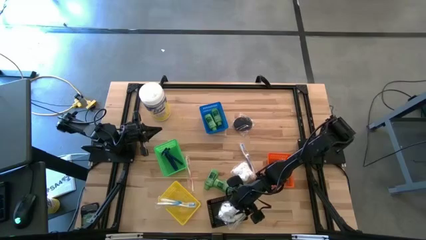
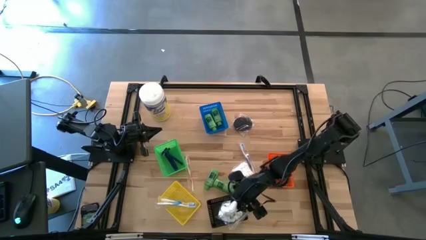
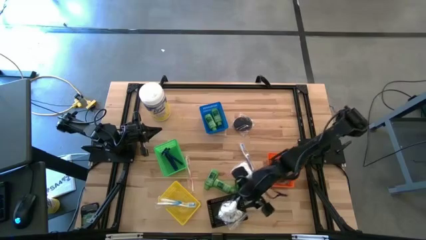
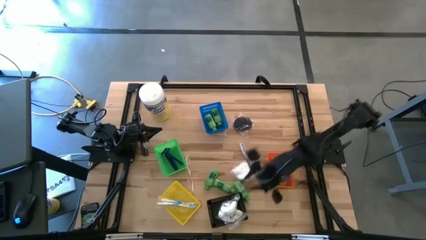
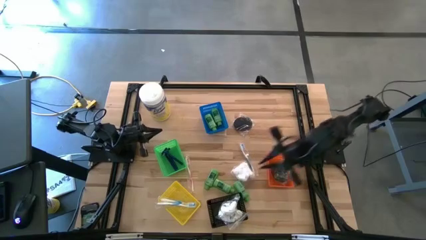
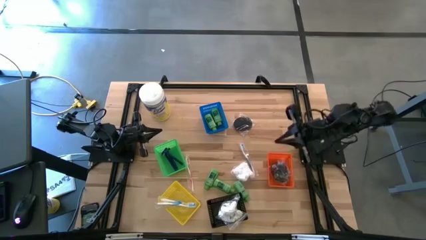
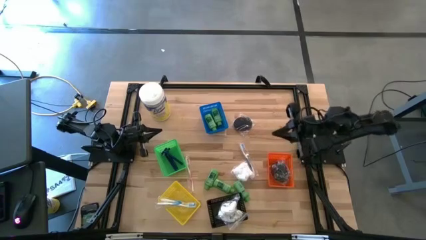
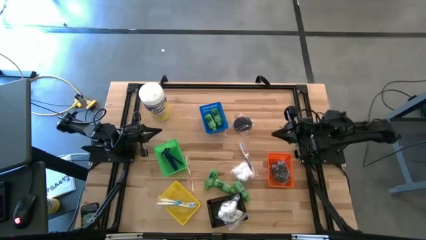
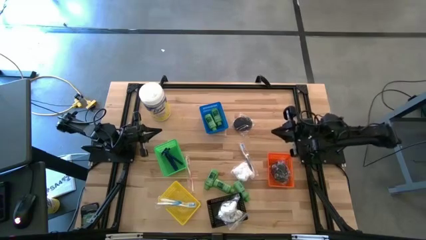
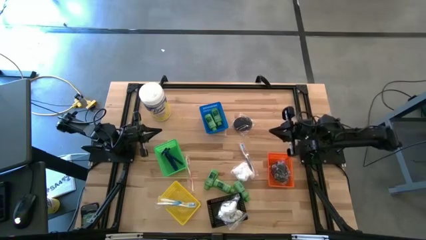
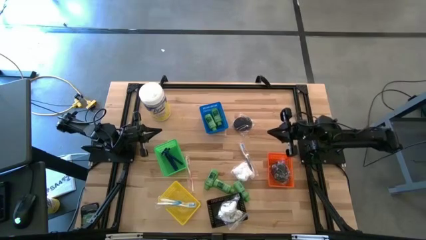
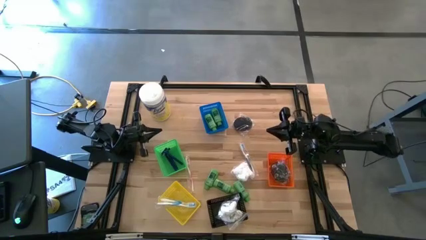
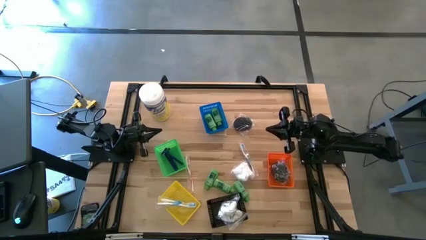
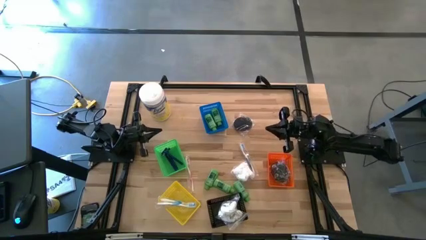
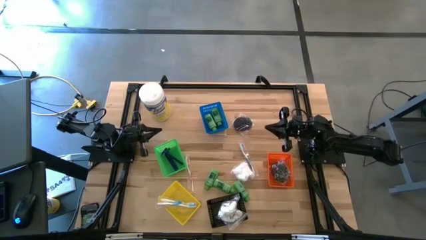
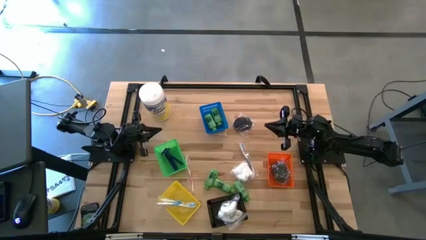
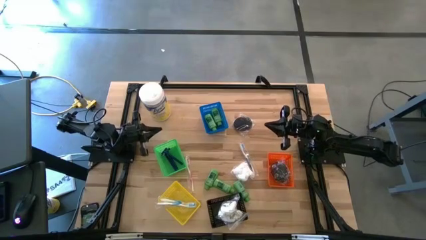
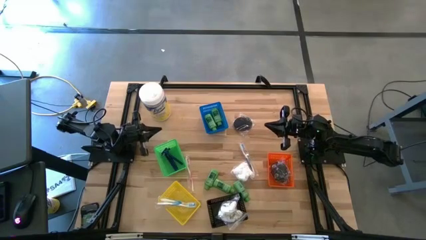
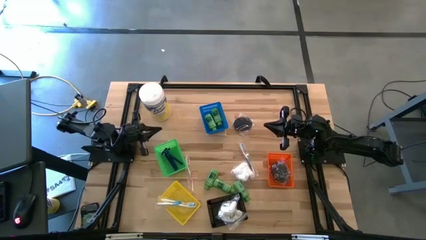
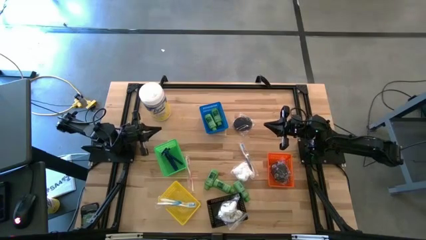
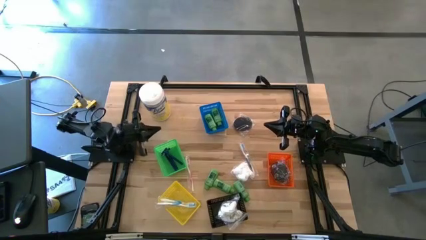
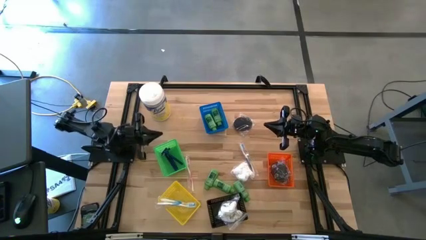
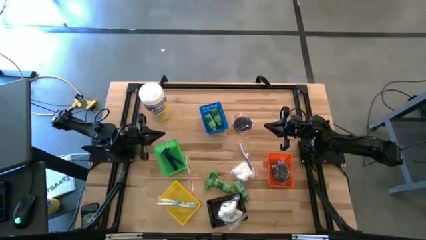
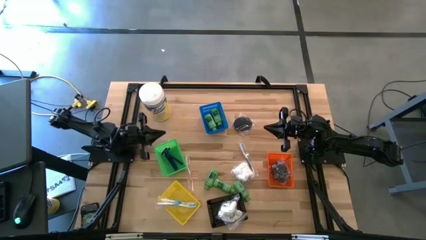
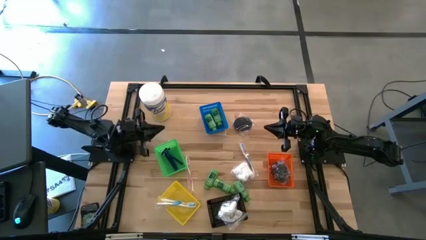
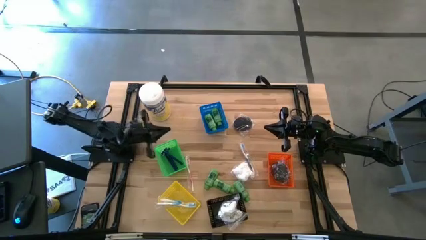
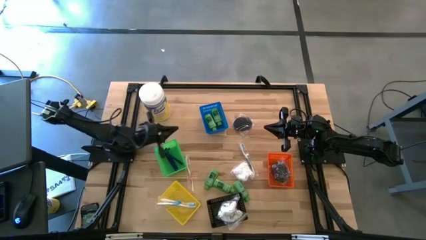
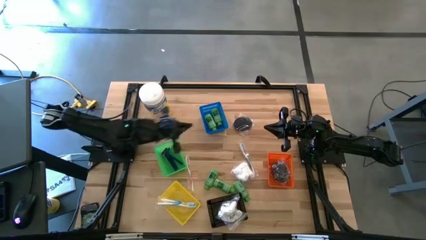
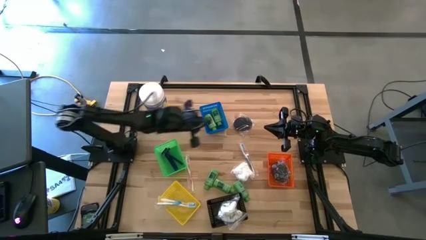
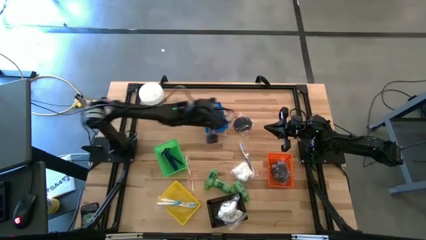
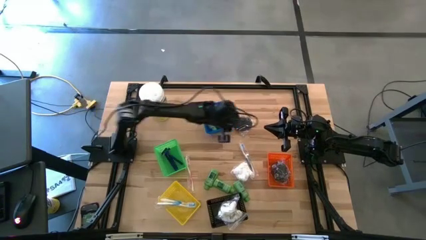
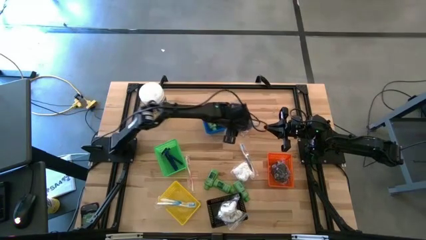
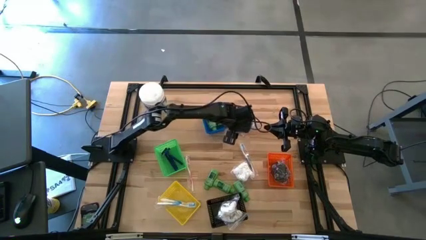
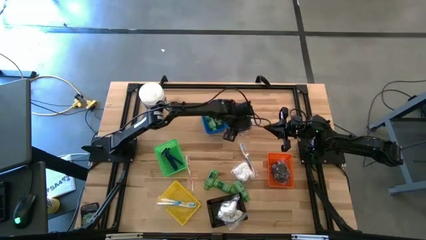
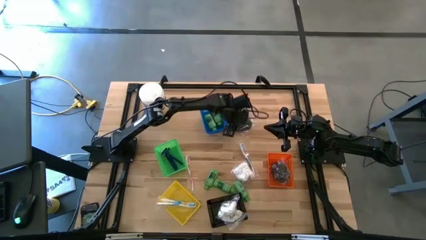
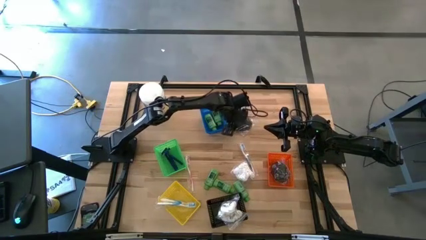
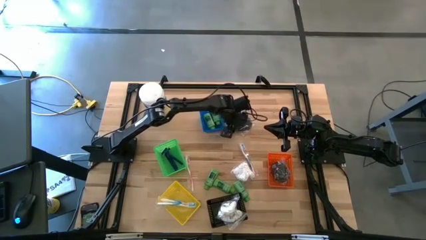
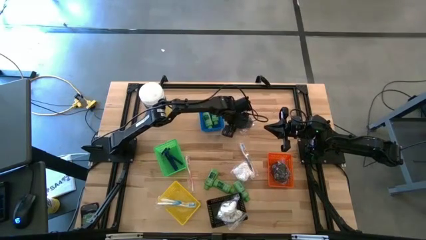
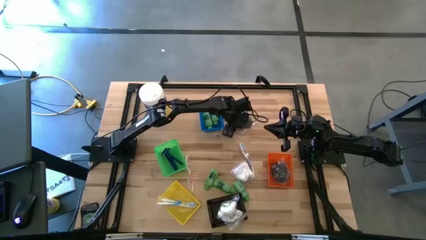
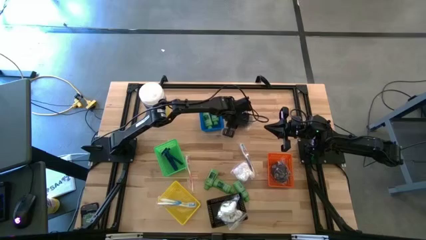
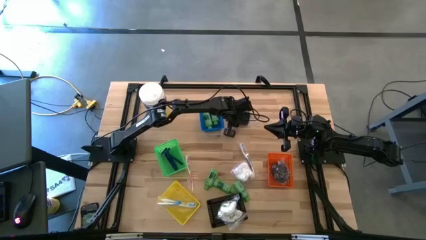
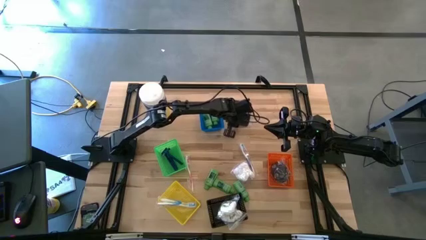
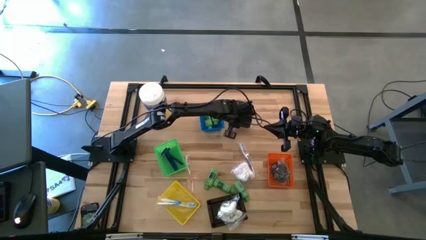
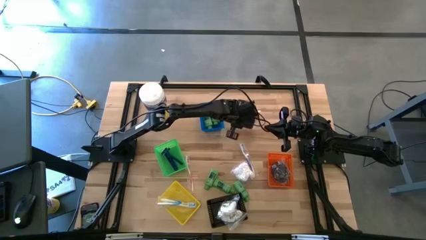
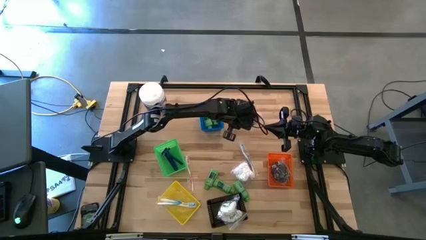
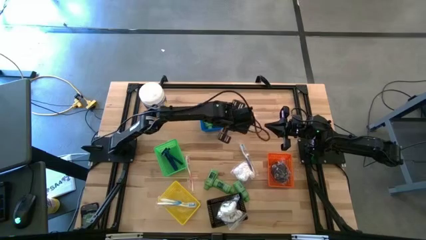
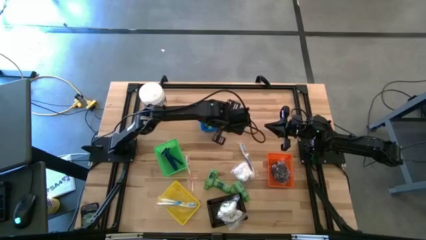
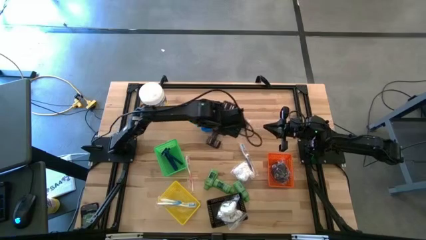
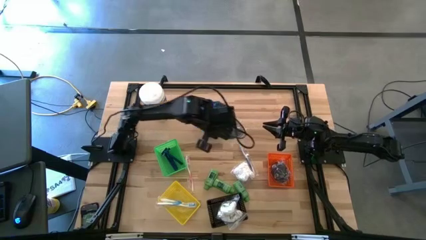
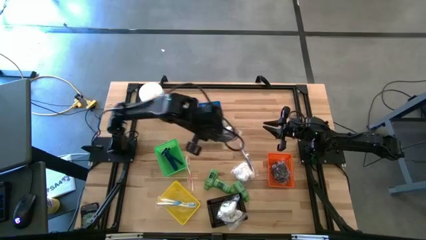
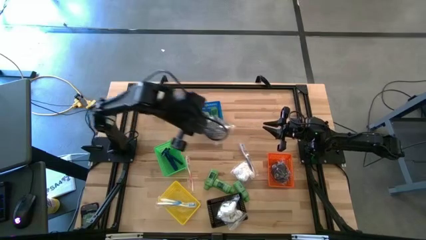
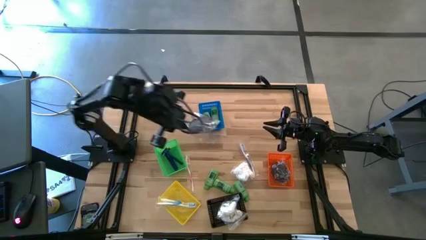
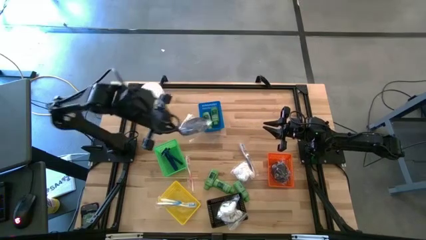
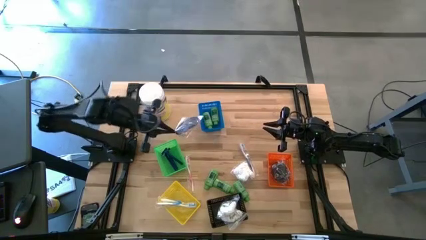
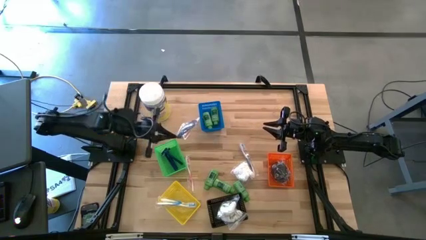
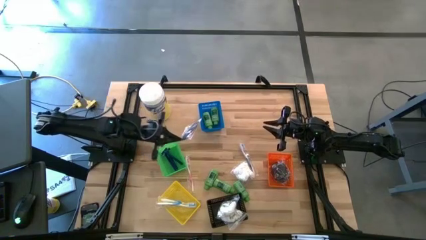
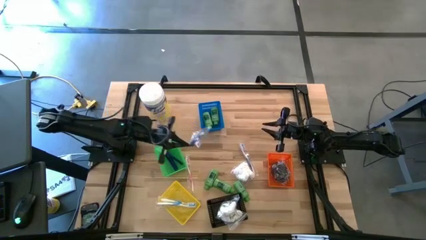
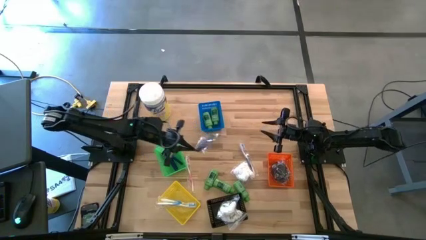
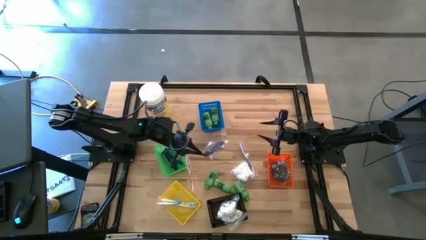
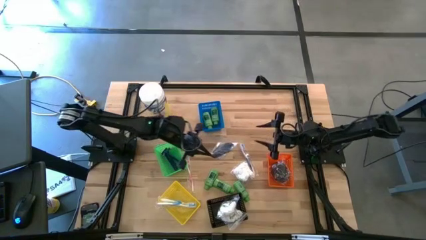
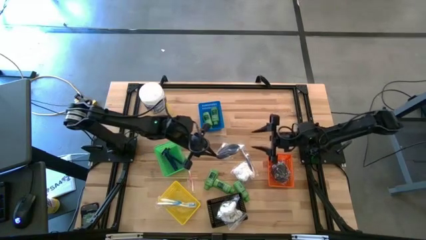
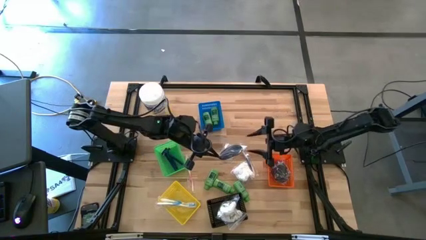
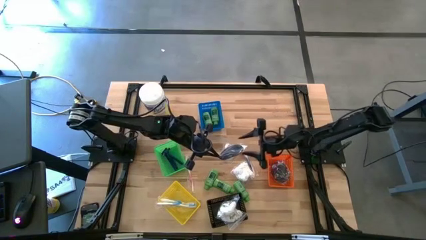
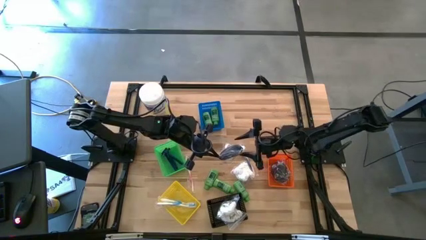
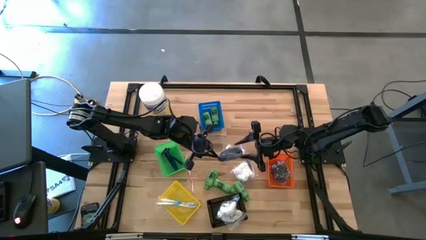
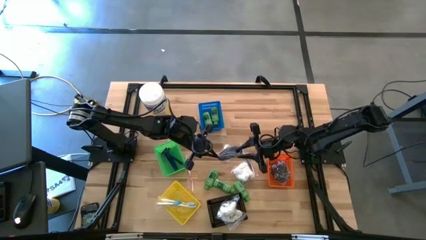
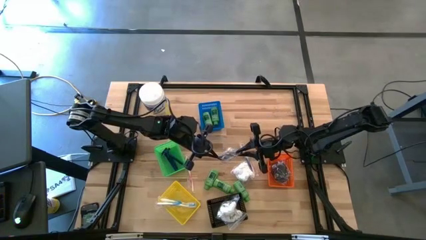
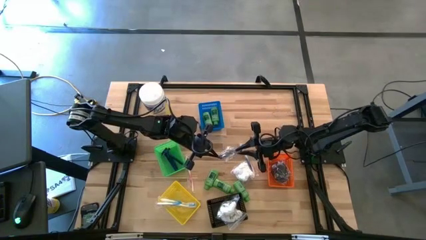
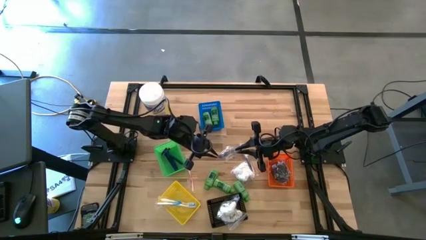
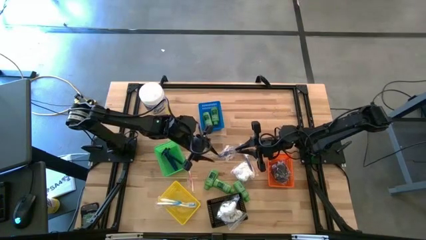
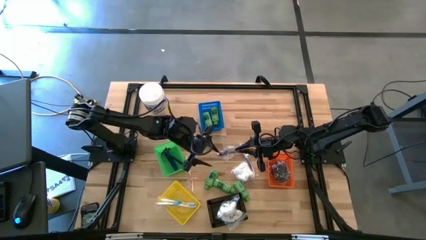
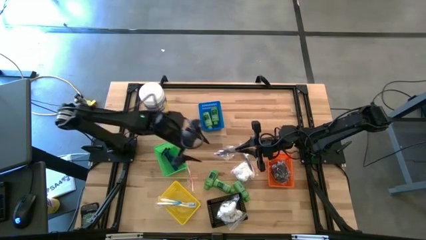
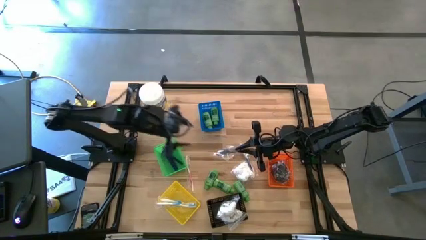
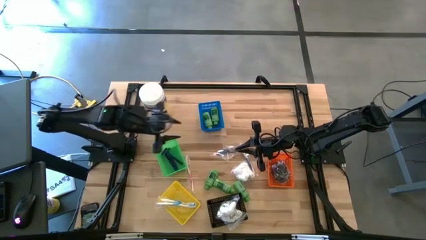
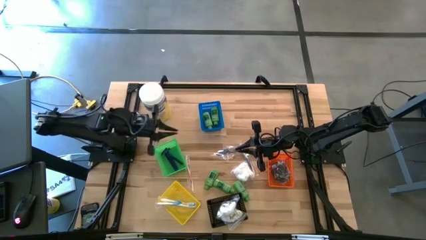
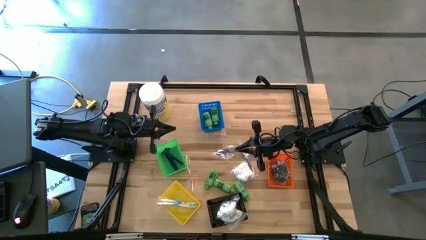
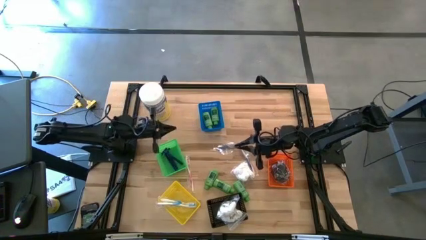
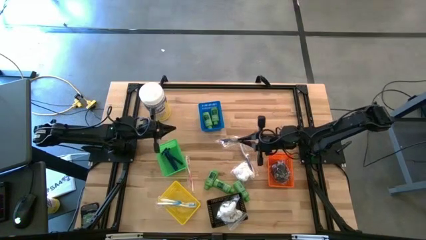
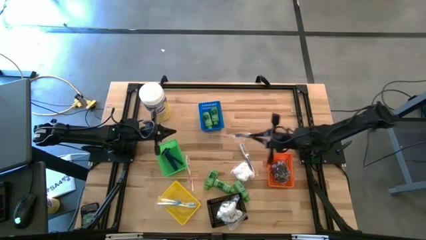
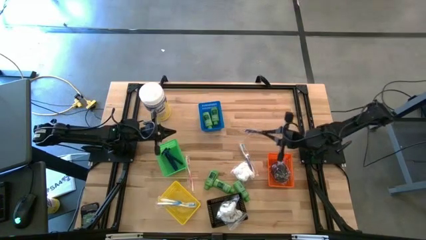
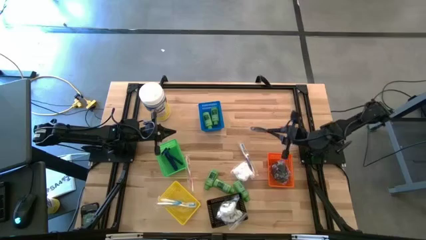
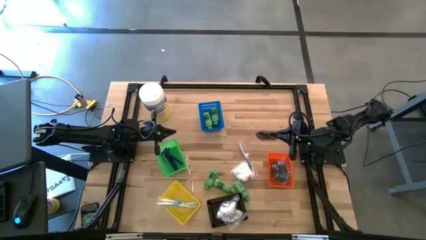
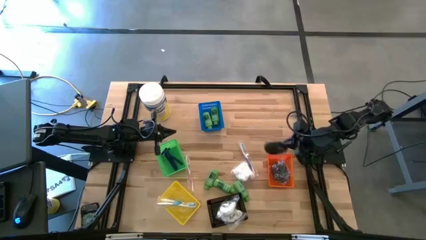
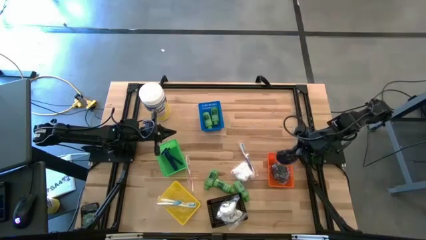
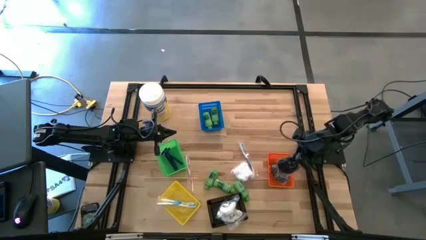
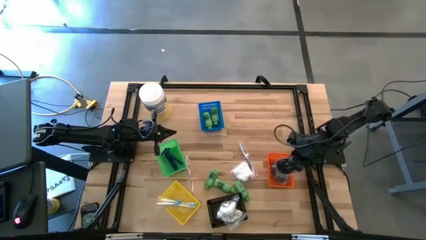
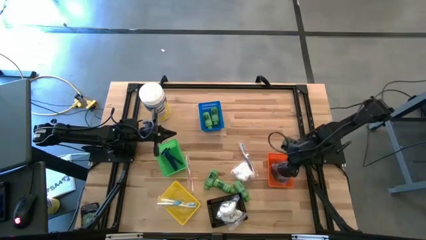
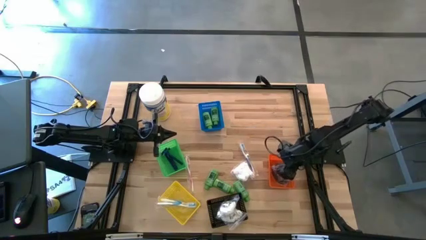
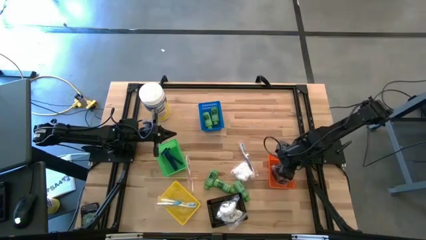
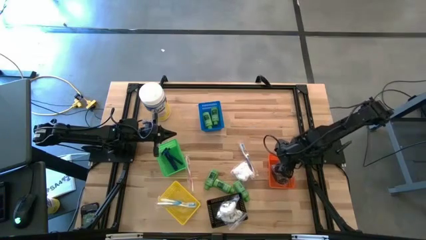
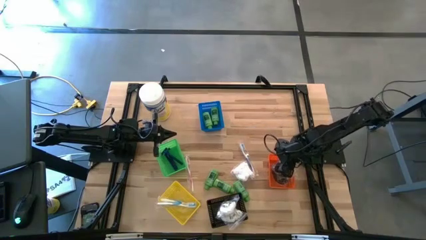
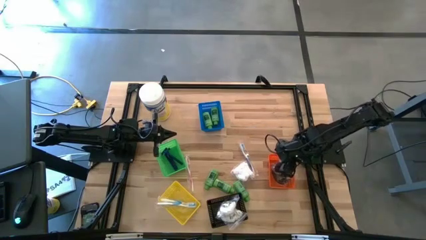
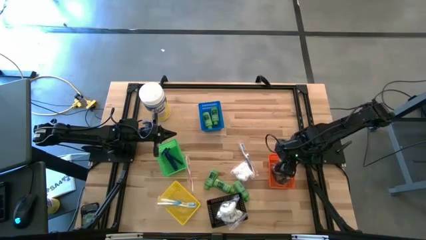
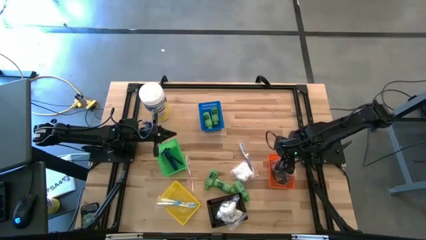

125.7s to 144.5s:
Task: Pick & Place Travel size toiletries
Put the hair brush into the orange bin
